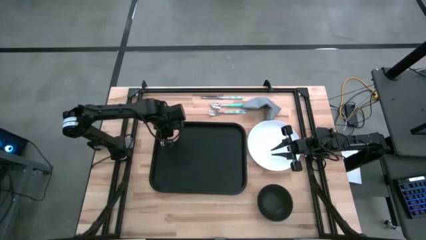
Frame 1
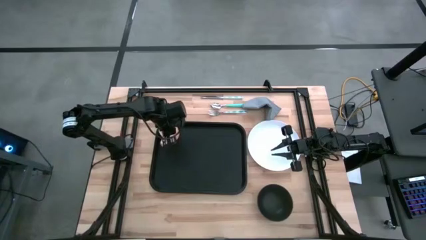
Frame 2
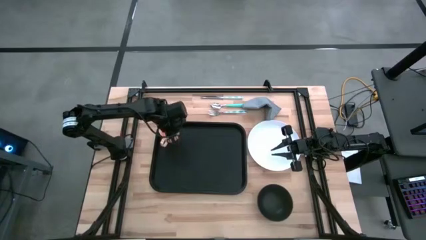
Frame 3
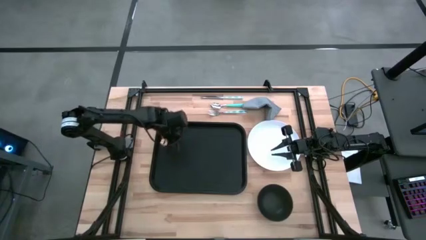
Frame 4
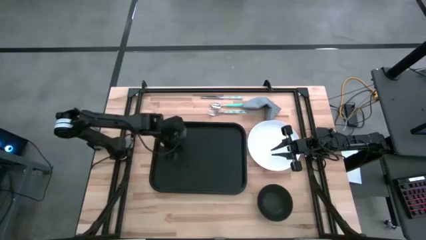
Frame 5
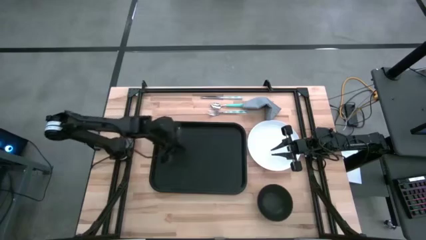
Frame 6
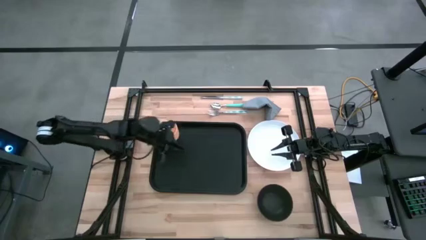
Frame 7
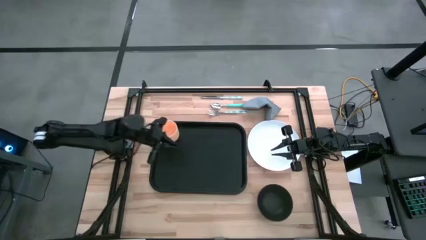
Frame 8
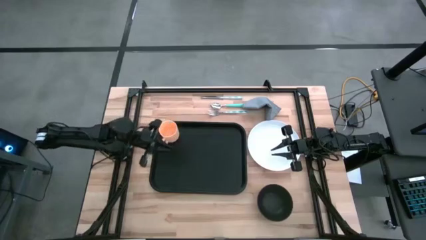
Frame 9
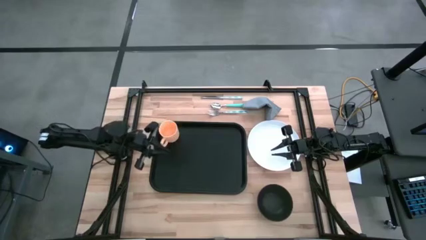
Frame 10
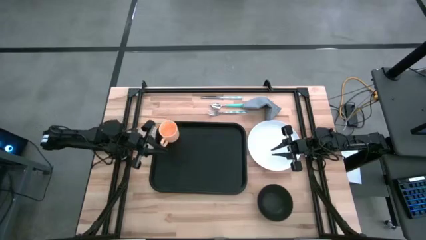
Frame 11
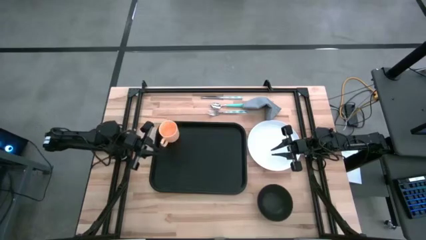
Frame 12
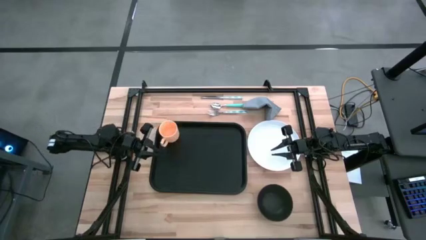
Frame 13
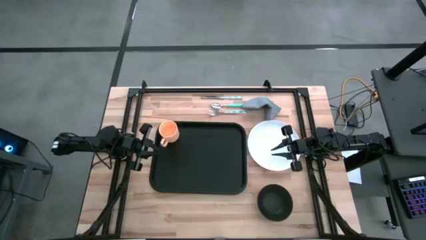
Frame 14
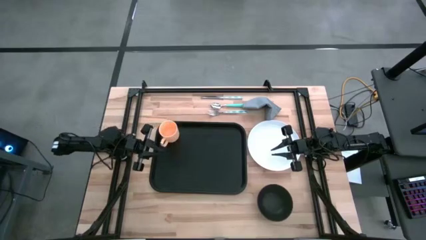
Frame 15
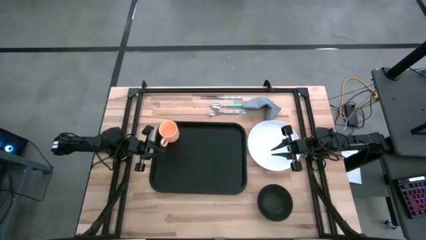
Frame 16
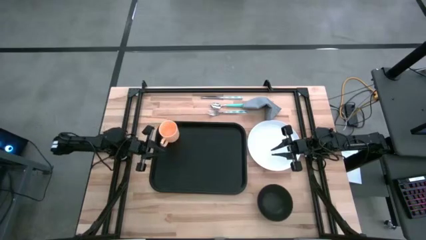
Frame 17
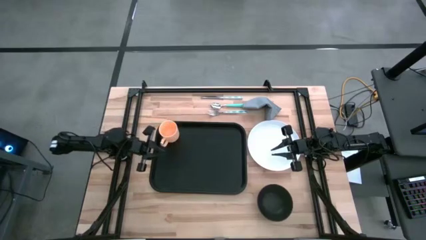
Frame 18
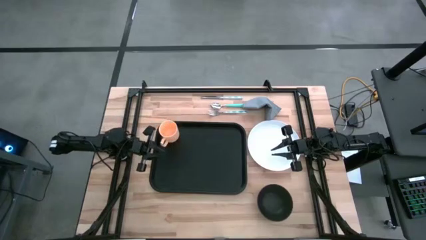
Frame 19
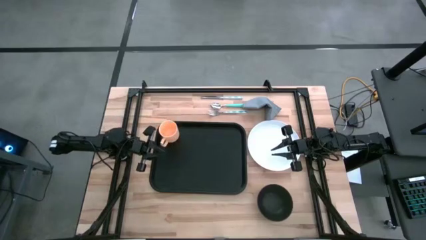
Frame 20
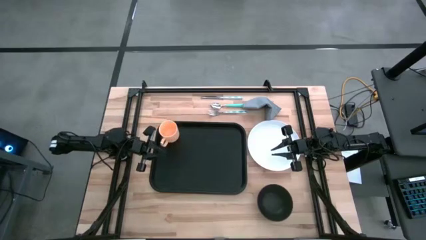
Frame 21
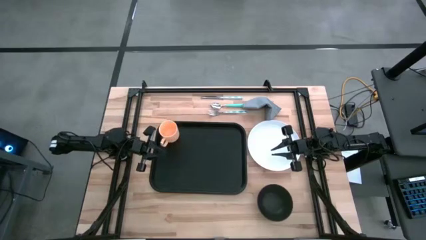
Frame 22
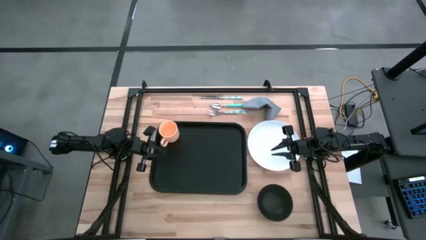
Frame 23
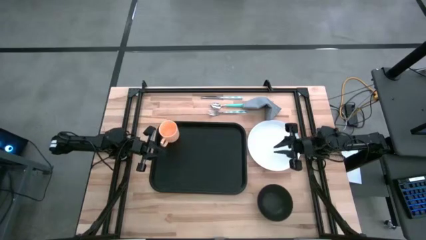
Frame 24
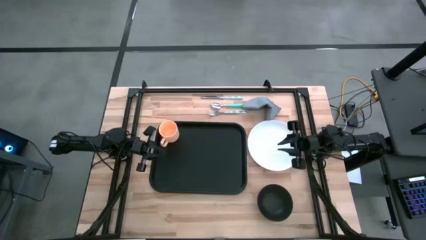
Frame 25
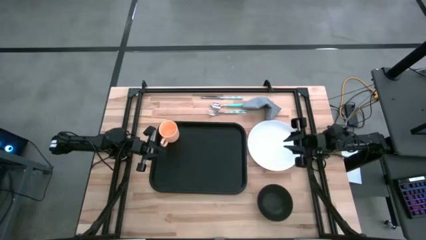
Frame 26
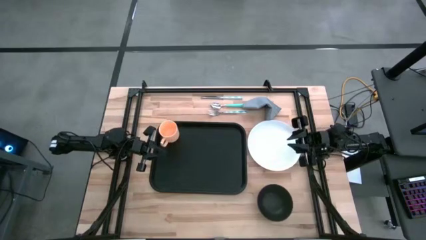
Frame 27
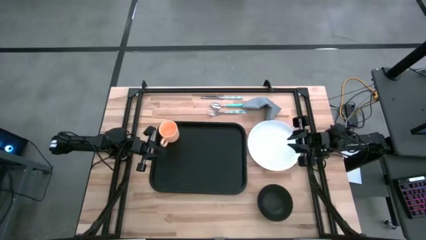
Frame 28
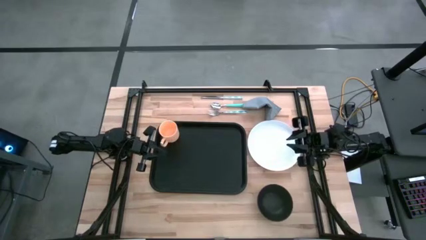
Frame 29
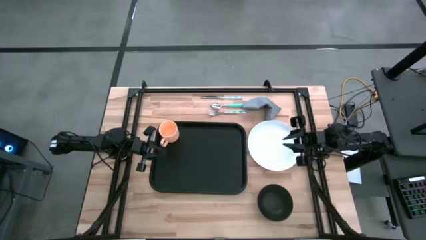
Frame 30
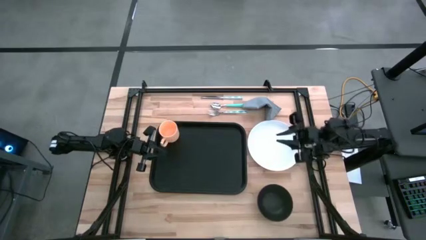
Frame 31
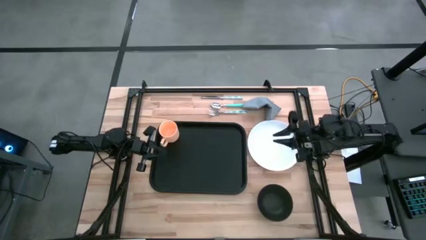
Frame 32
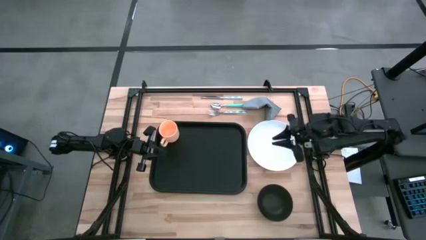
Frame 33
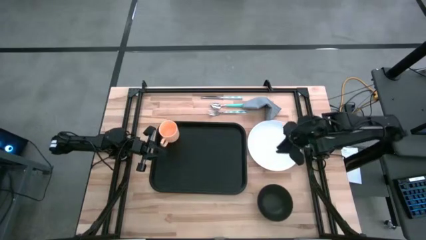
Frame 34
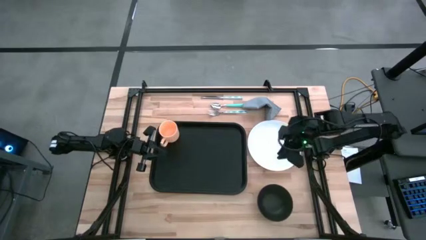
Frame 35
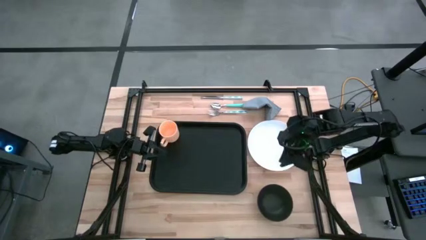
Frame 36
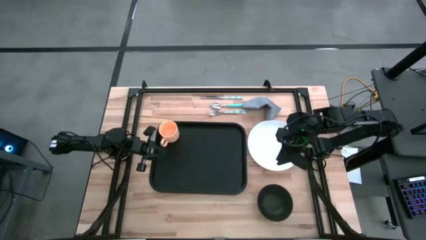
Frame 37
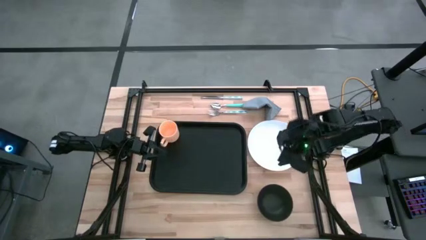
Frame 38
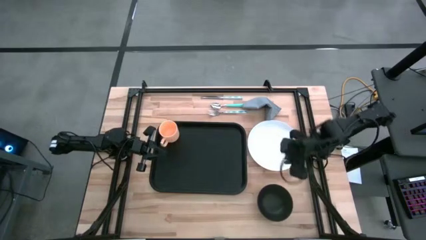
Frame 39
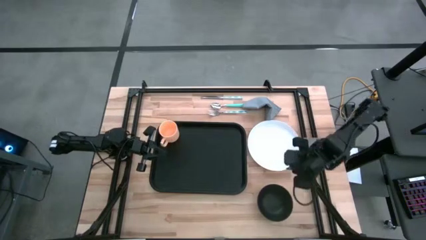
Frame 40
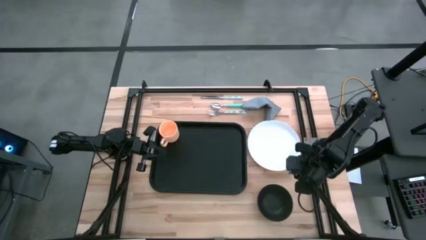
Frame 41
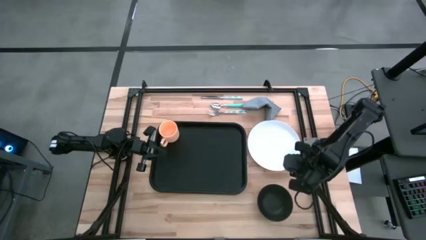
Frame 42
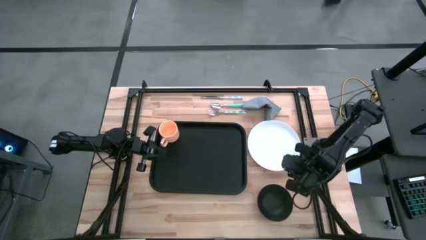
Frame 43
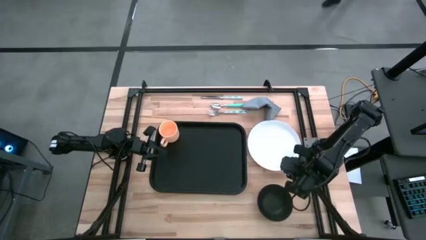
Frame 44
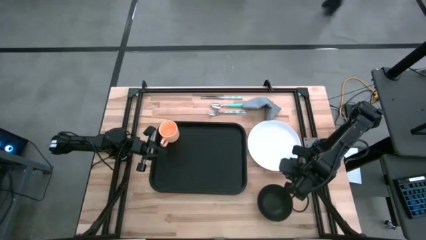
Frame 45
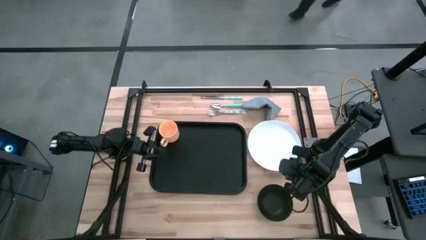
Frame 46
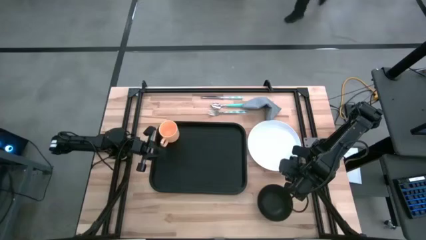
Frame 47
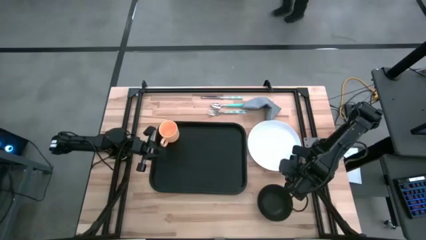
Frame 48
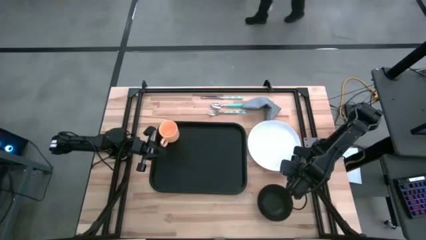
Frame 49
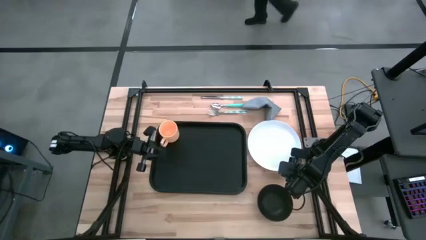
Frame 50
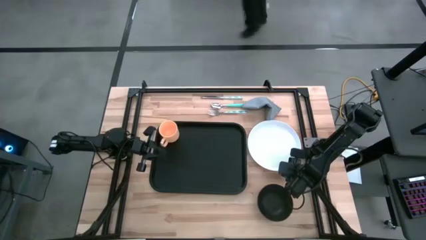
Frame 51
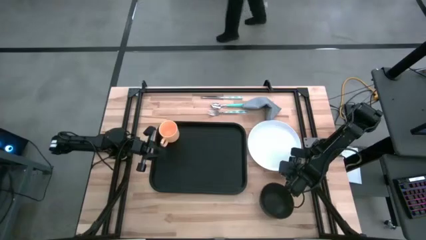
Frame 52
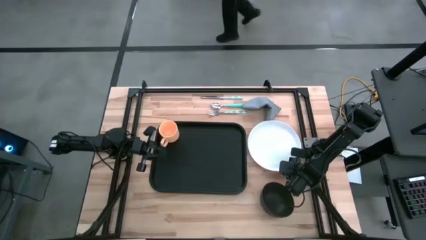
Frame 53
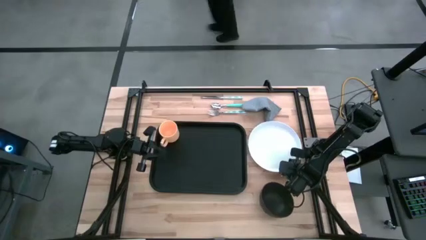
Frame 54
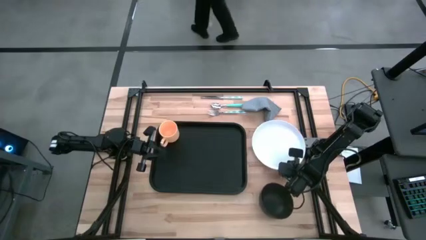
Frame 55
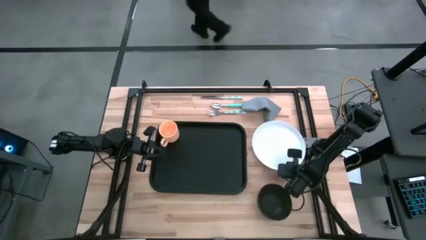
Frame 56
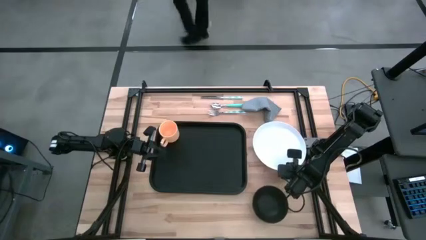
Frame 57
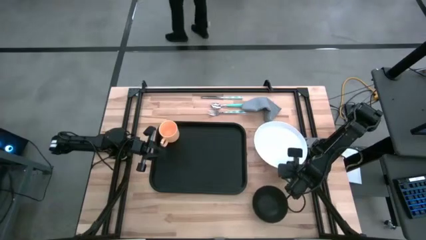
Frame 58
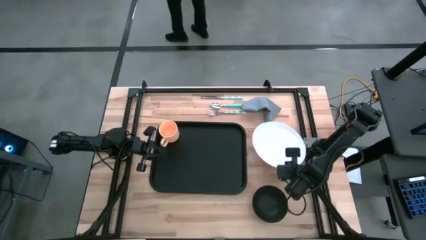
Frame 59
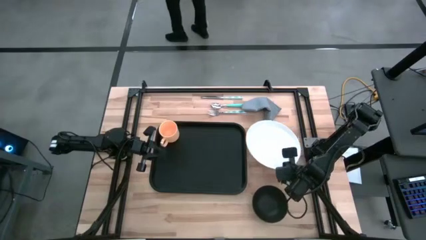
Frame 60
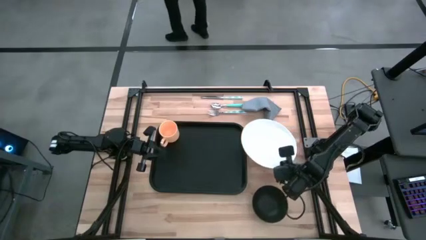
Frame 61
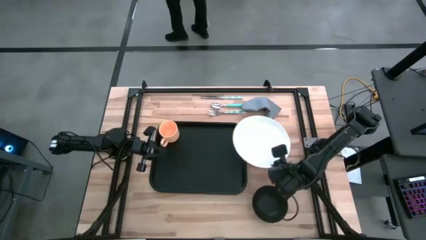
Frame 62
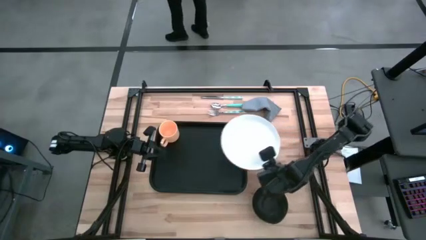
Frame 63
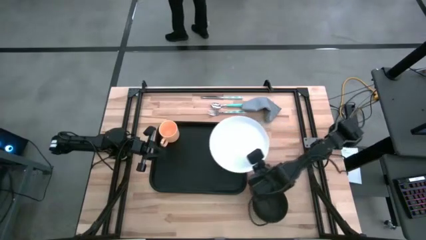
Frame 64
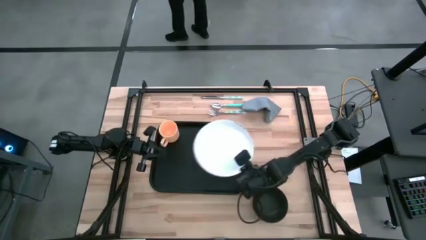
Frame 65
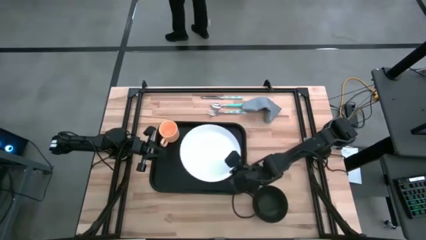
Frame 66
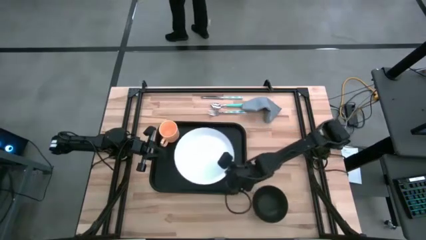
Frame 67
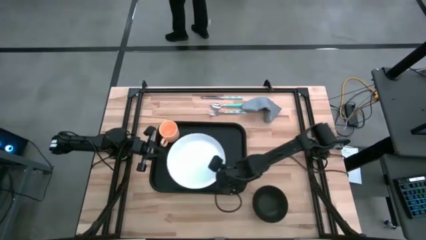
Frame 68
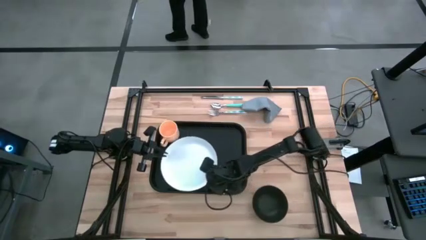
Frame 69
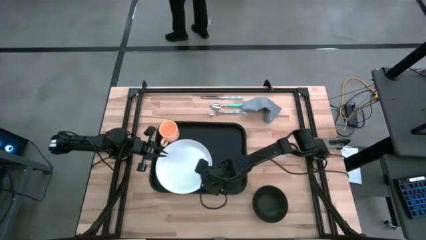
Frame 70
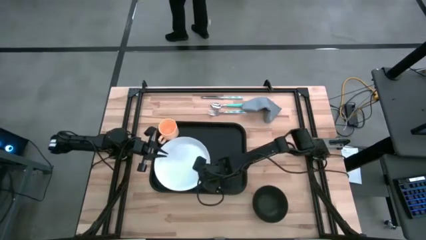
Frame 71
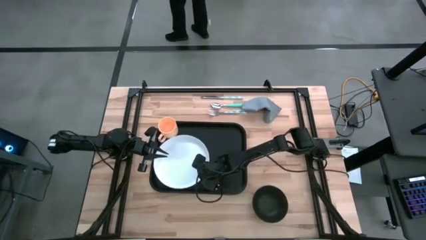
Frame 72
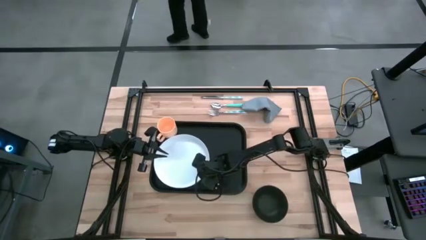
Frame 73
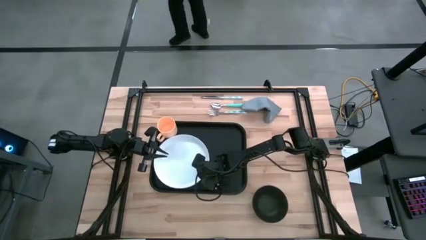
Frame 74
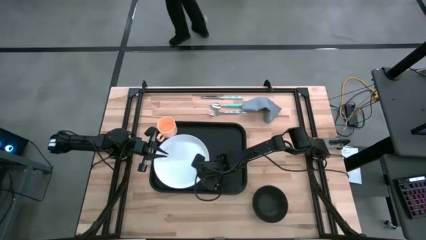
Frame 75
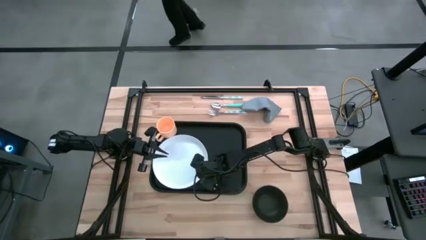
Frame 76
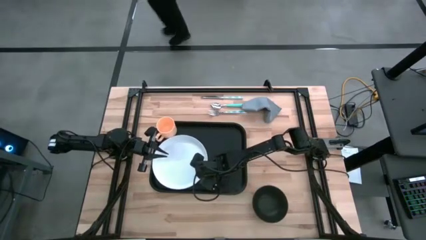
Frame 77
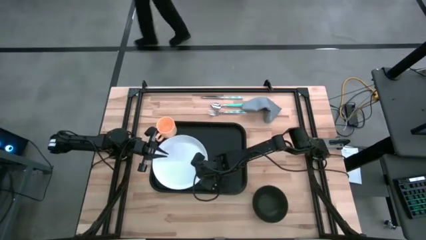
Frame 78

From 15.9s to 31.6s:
Task: Set up tray
Put the white plate at the bottom of the yellow mug on the black tray
